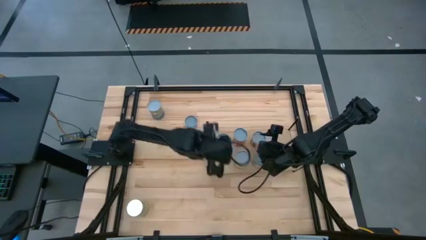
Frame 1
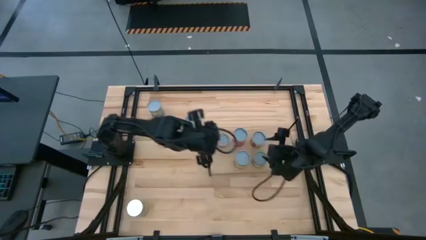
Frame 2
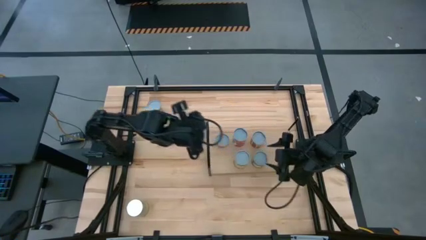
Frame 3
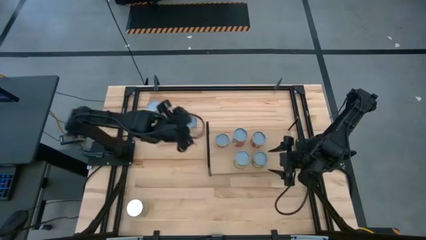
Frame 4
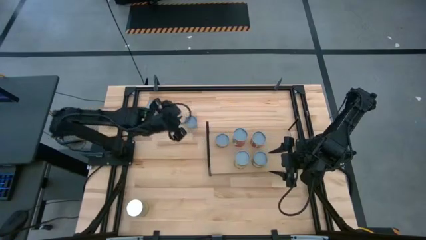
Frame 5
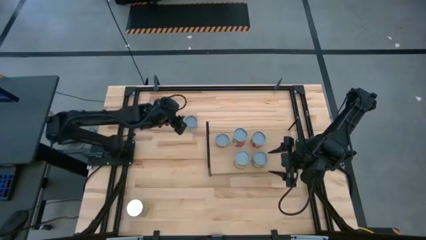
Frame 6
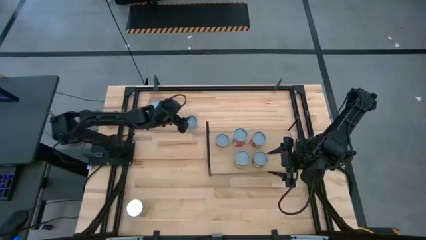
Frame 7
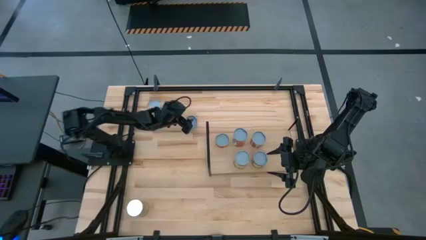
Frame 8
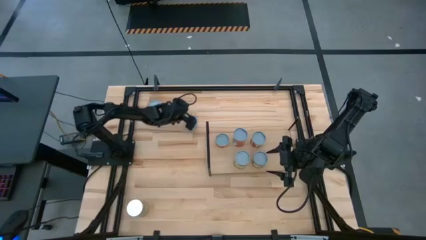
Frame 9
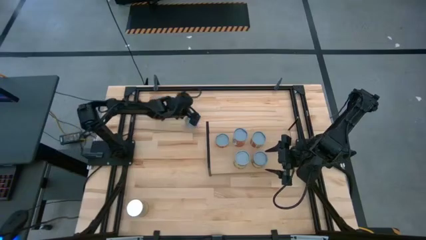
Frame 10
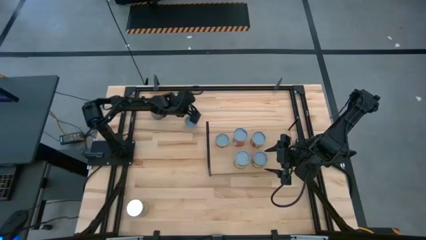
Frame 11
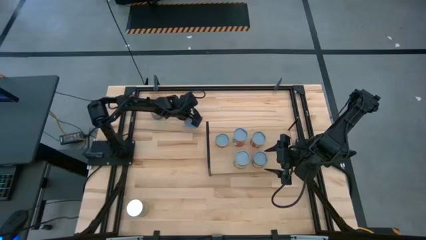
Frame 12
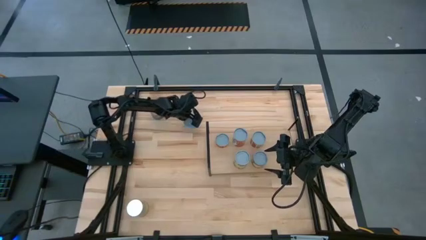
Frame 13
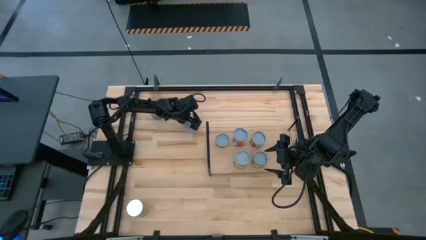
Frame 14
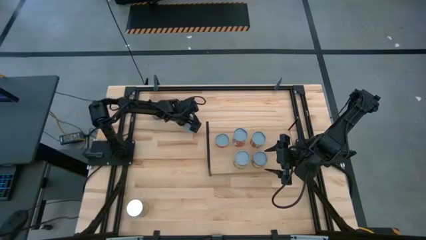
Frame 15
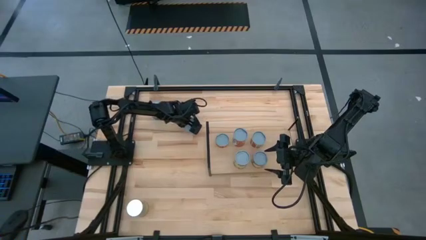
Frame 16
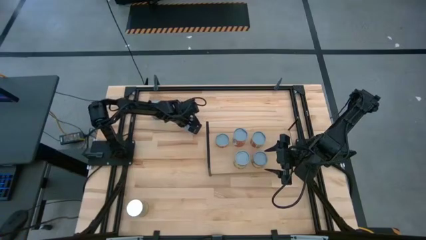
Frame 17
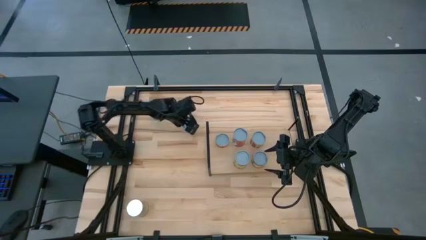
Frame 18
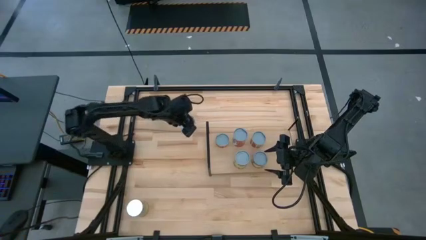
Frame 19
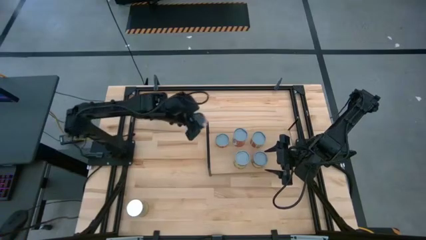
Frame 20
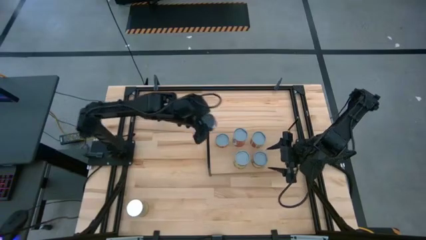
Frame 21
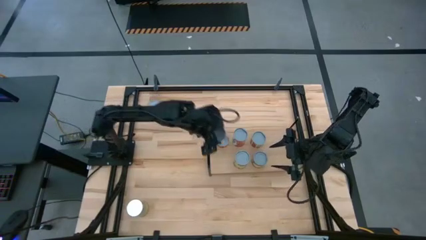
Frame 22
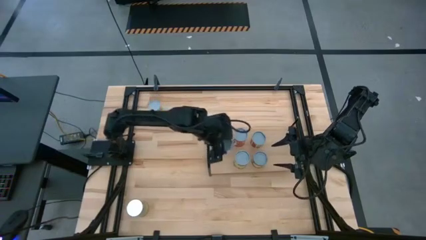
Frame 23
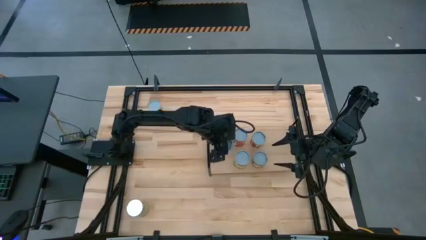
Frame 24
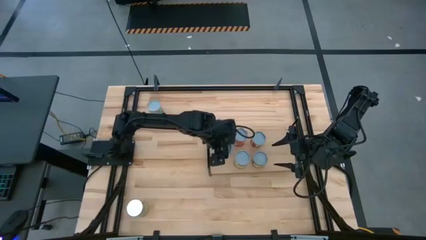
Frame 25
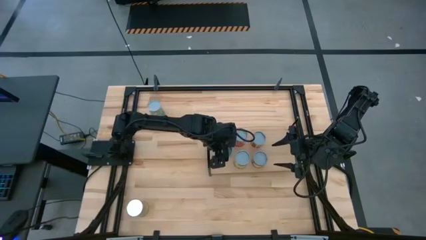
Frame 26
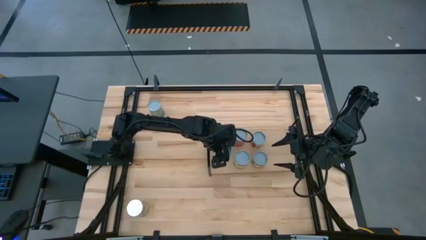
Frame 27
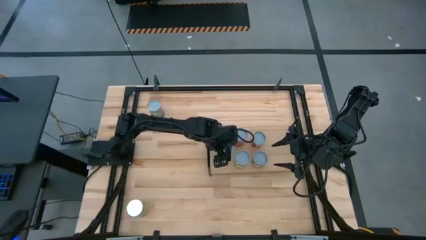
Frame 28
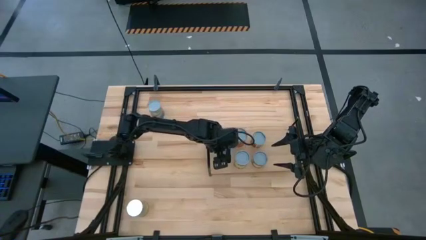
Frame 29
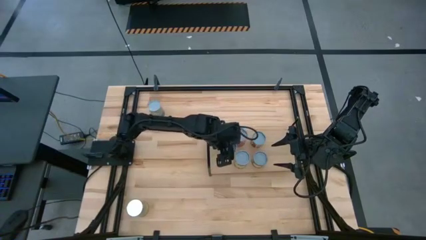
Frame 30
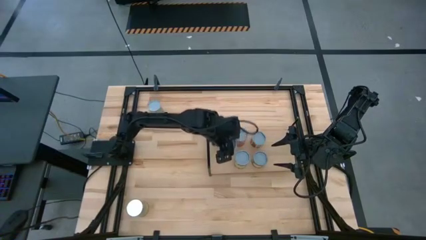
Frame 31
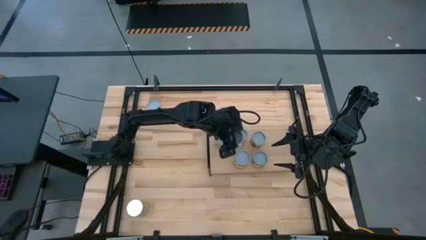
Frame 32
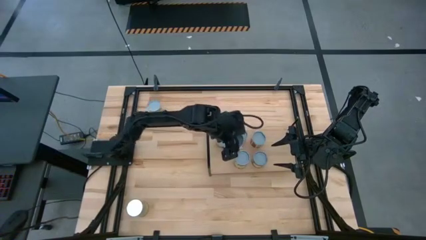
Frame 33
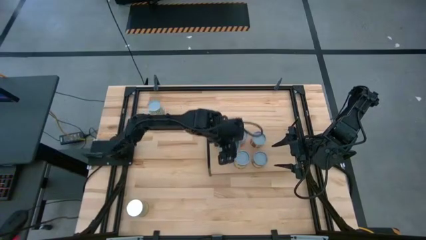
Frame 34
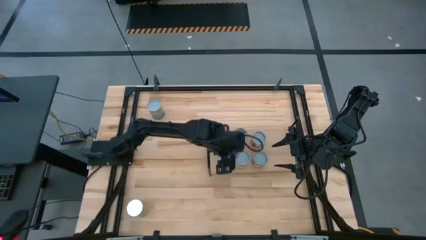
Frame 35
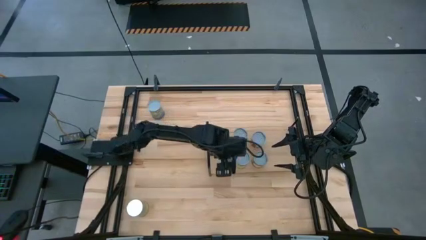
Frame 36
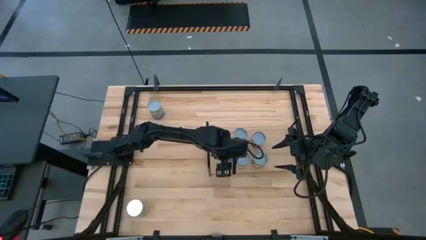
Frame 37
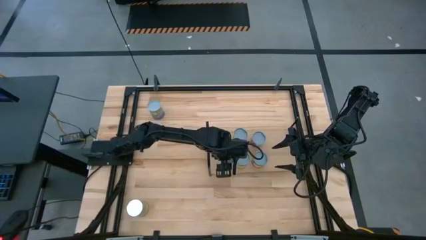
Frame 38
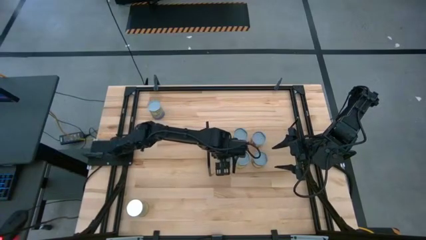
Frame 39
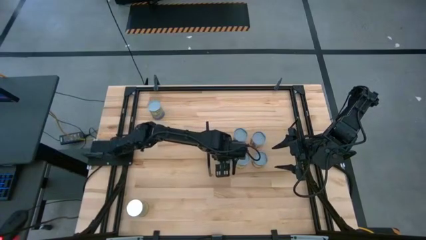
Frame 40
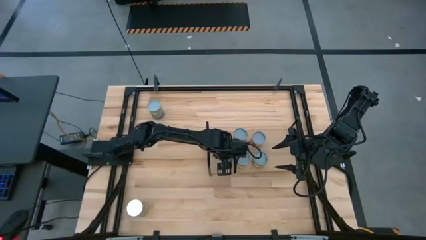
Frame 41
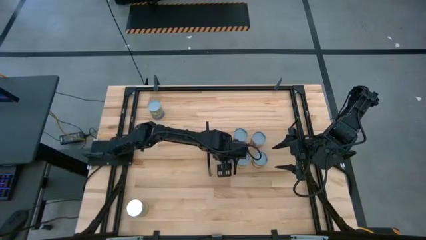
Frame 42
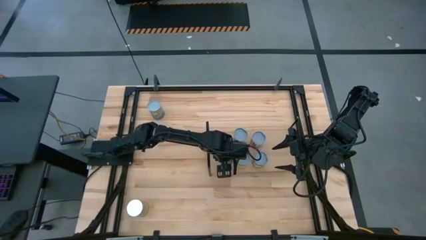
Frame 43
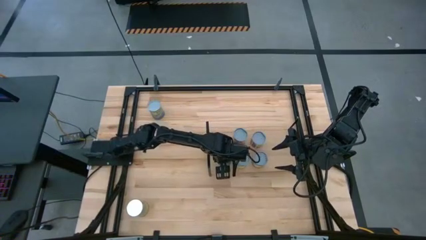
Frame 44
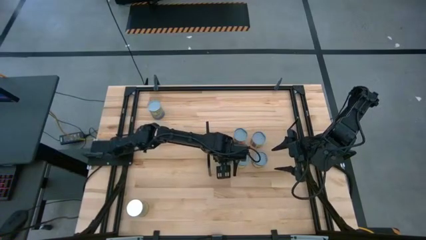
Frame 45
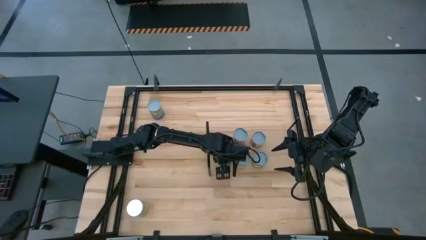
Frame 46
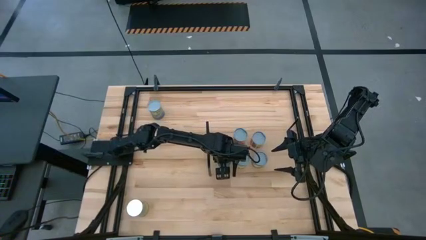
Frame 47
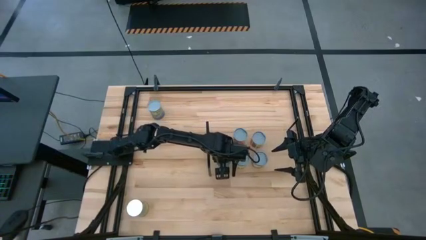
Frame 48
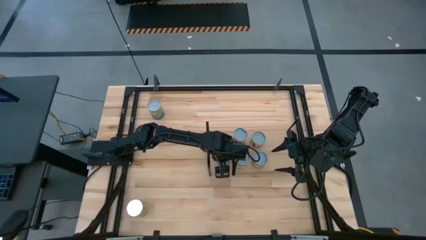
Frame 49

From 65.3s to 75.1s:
Task: Pick and place cans onto a shelf
Put the light blue on the shelf aligned with the yellow can

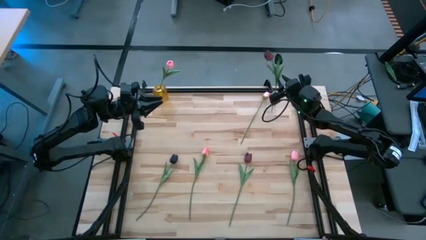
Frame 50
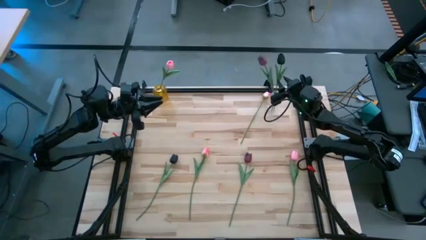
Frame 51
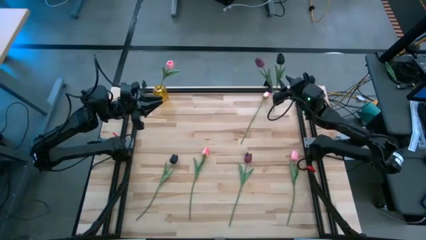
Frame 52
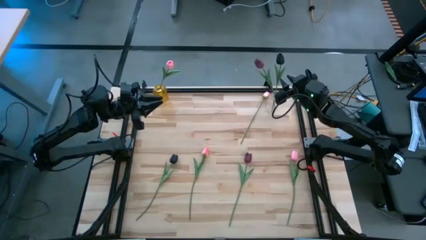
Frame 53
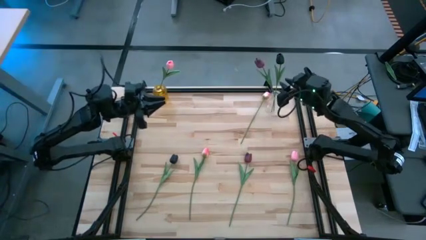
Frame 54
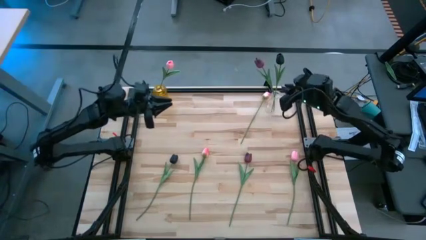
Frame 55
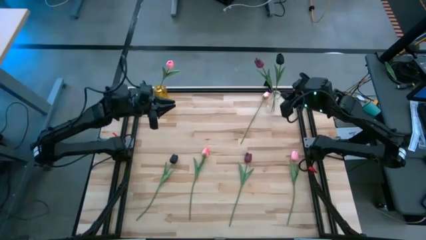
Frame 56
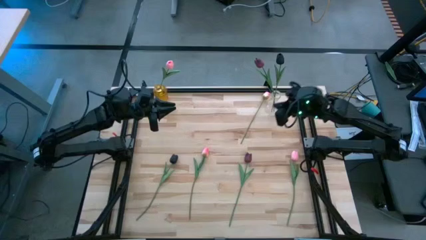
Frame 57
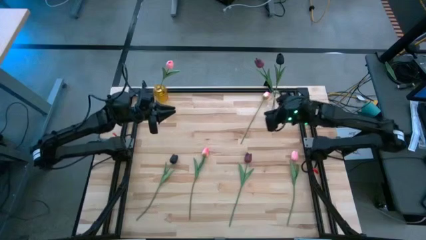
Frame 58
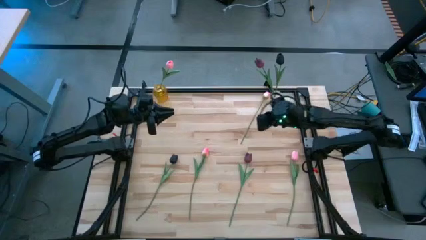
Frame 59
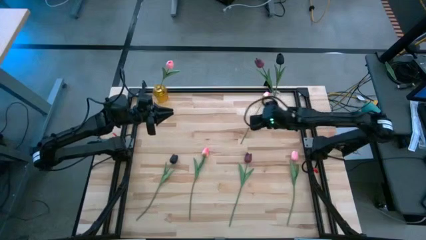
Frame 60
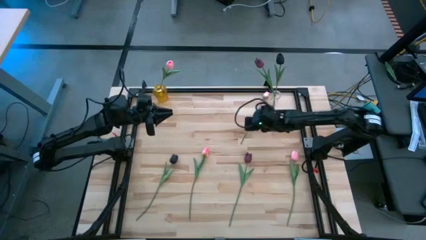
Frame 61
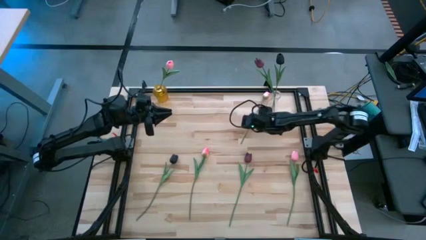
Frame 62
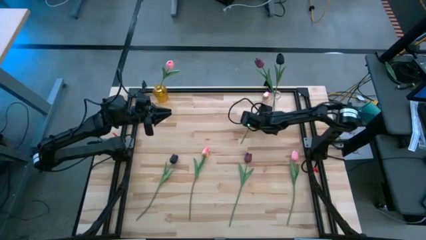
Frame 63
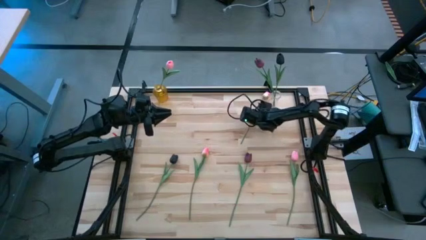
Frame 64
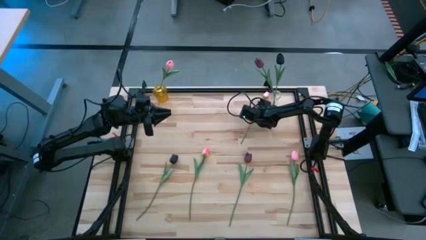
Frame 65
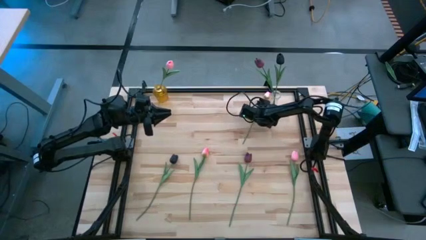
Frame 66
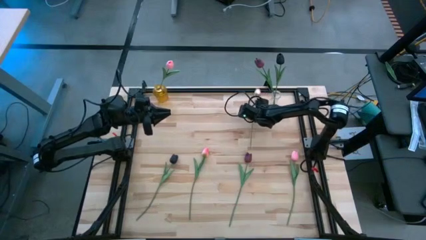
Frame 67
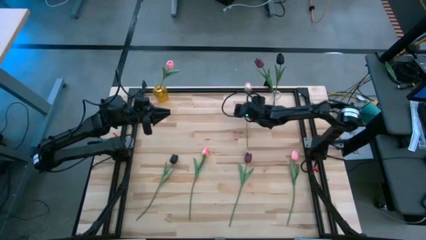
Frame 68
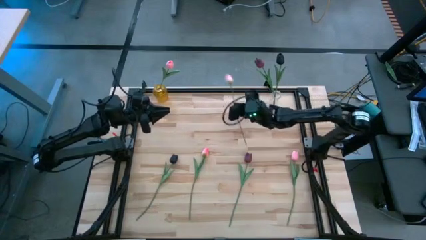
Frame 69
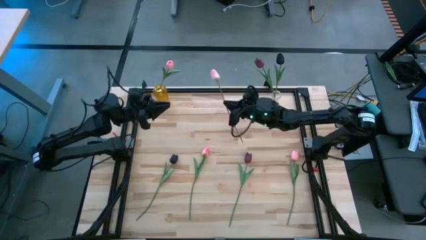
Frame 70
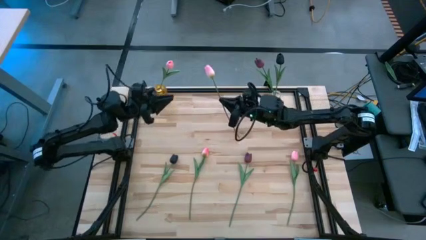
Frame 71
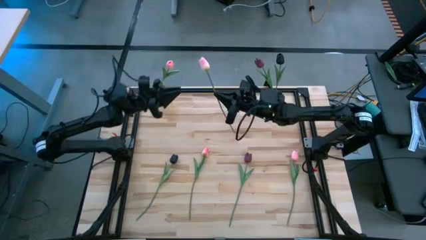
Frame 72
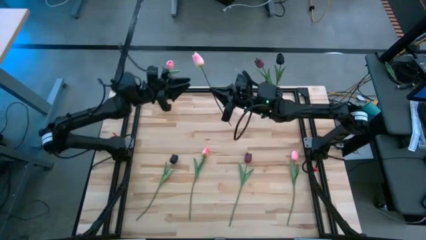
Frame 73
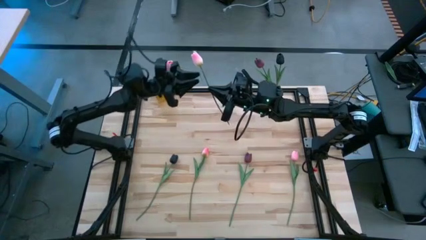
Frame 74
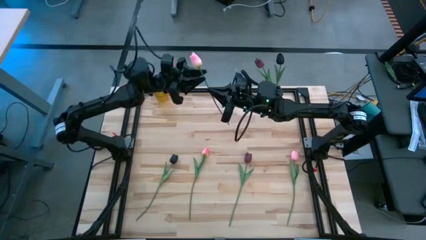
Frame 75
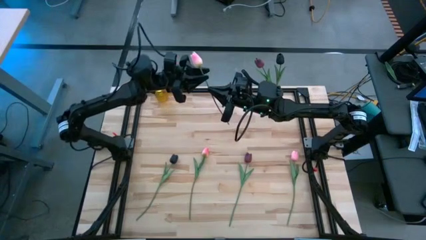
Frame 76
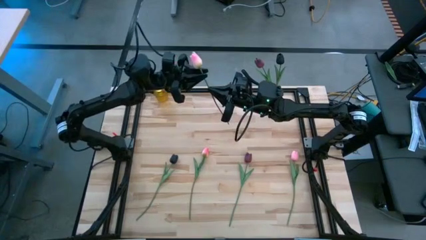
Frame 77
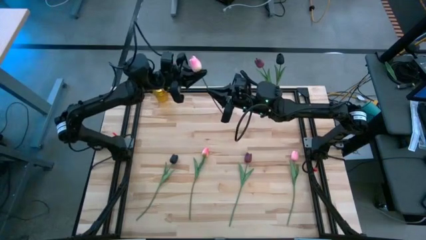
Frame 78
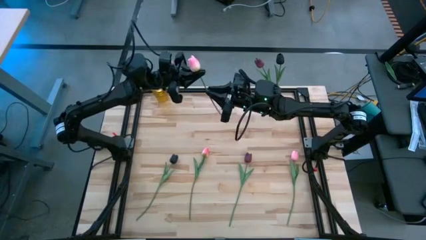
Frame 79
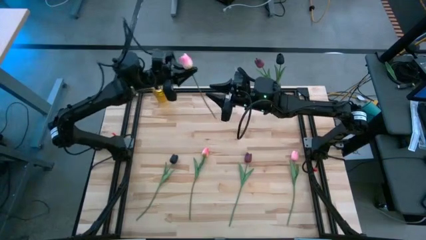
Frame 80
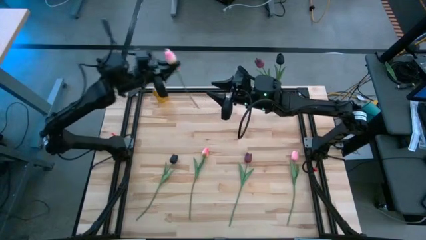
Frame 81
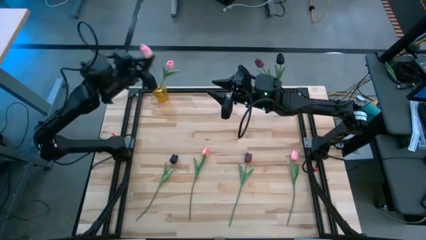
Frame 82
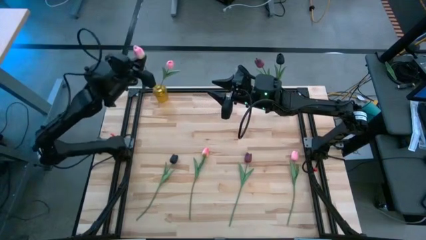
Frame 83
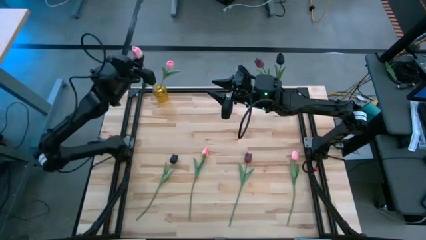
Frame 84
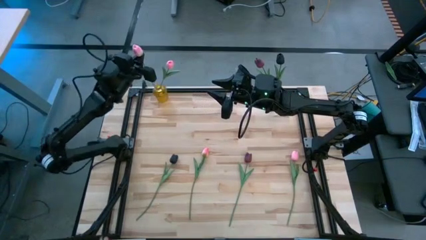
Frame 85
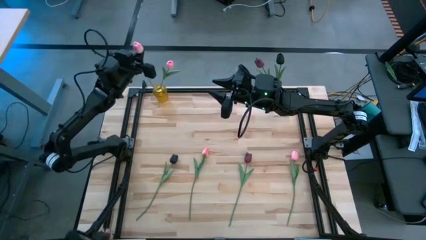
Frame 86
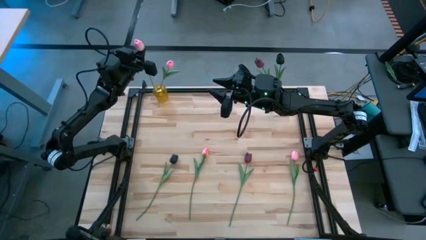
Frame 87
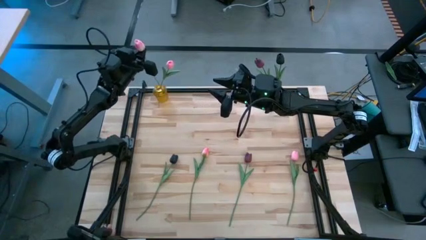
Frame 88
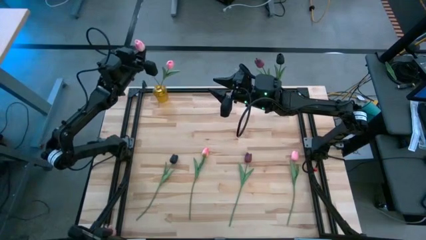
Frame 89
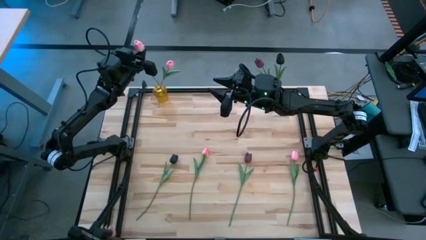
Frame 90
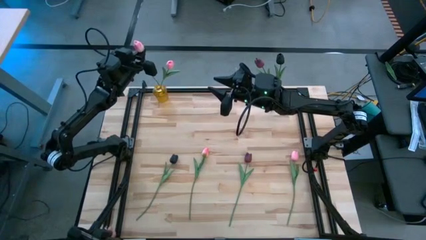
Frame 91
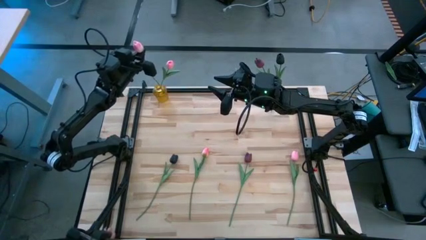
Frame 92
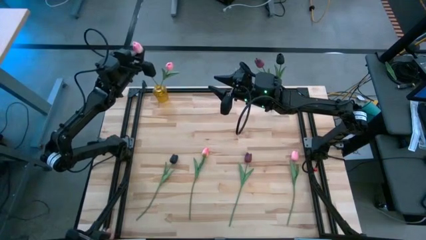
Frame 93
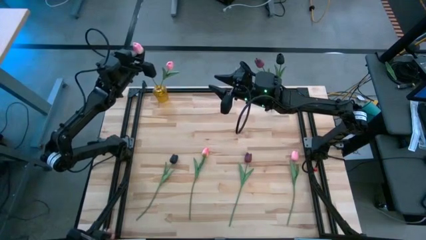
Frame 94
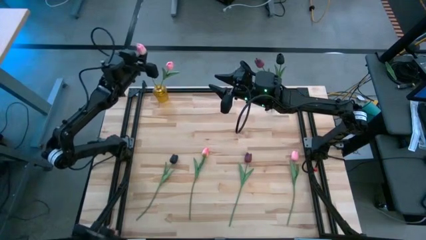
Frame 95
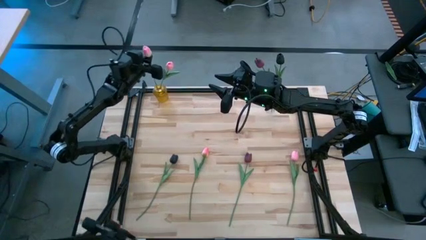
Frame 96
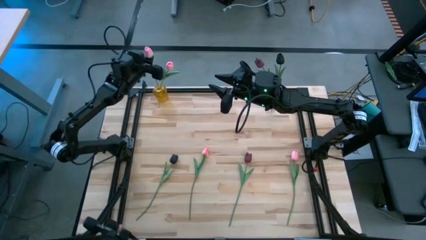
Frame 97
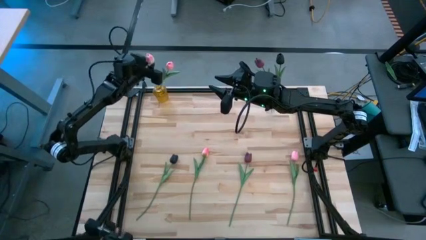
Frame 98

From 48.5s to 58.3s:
Task: Sort flowers into vase by color
Insert the center top pink tulip into the yellow glass vase
